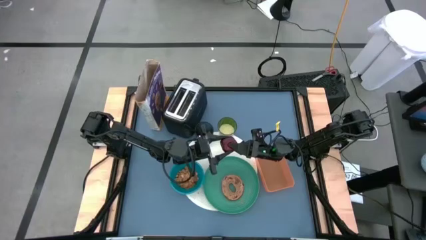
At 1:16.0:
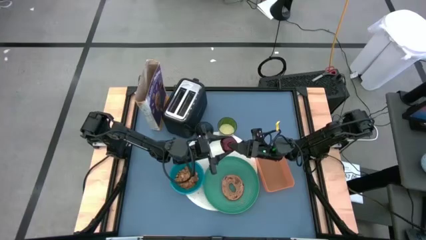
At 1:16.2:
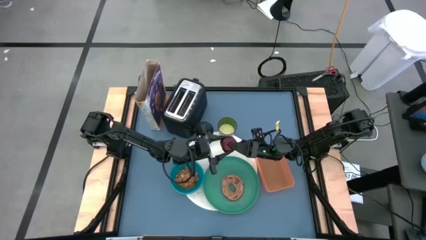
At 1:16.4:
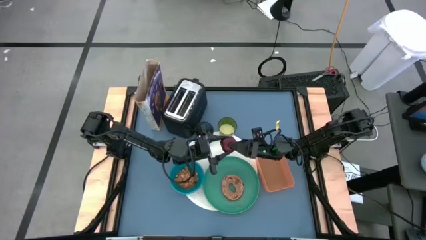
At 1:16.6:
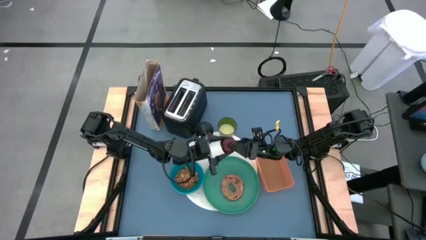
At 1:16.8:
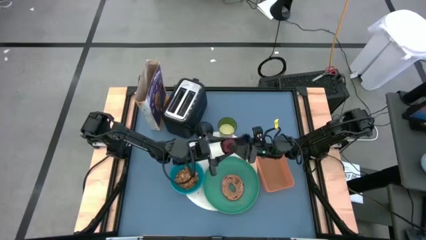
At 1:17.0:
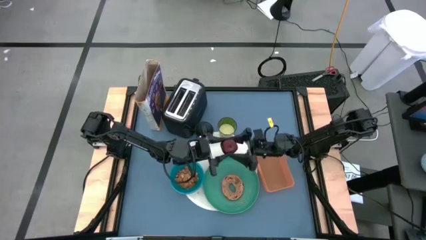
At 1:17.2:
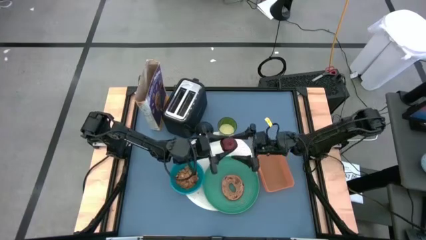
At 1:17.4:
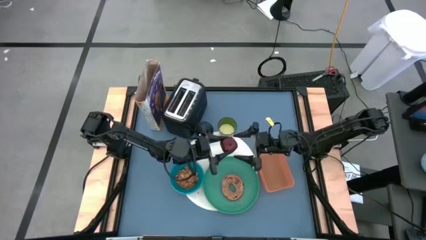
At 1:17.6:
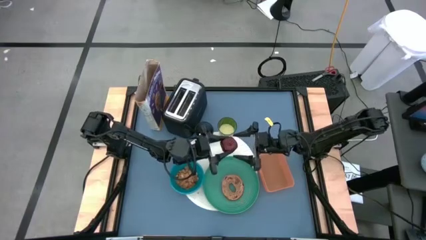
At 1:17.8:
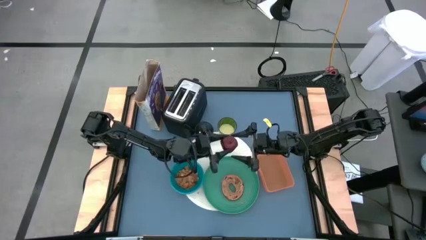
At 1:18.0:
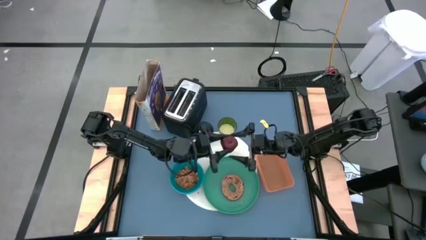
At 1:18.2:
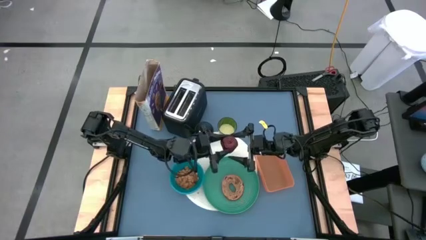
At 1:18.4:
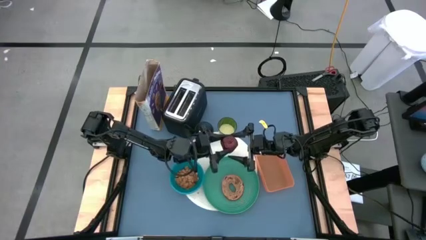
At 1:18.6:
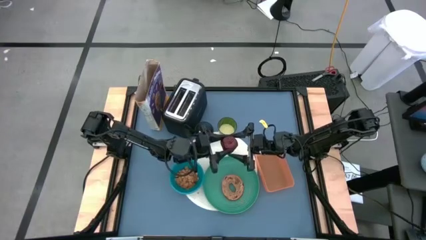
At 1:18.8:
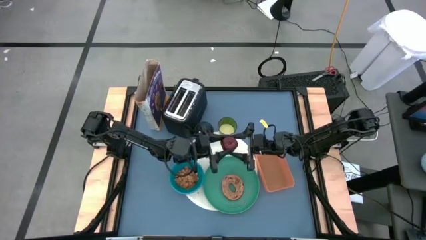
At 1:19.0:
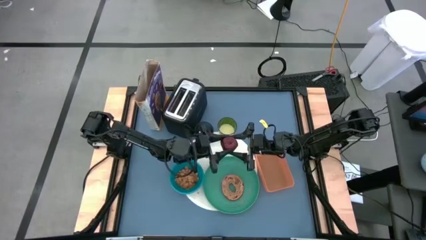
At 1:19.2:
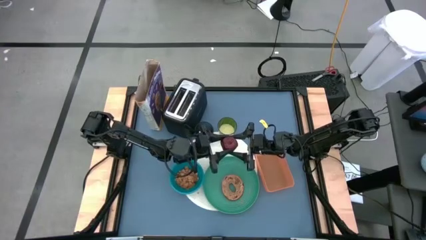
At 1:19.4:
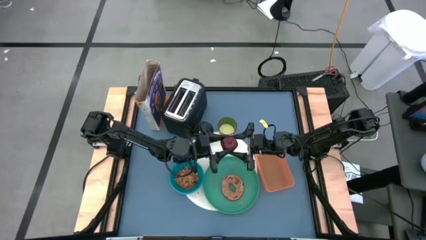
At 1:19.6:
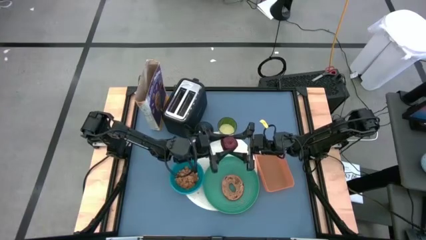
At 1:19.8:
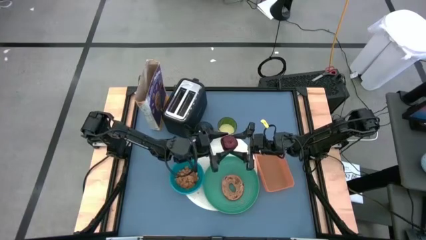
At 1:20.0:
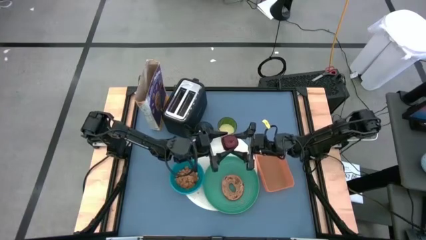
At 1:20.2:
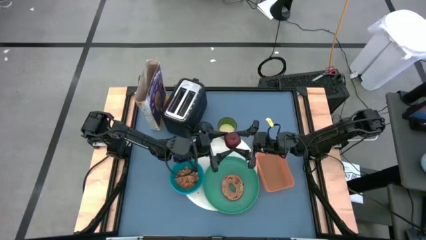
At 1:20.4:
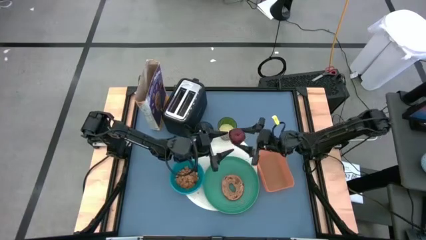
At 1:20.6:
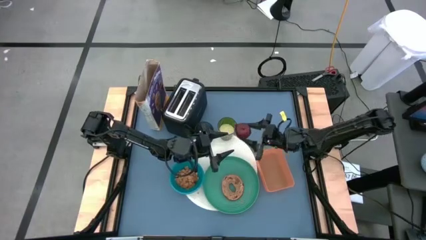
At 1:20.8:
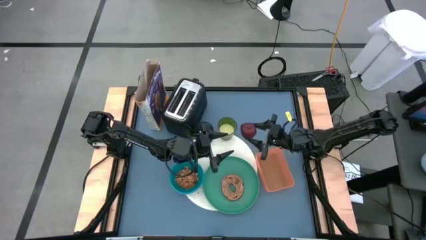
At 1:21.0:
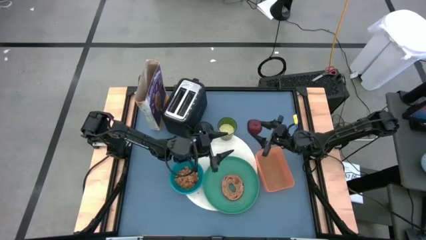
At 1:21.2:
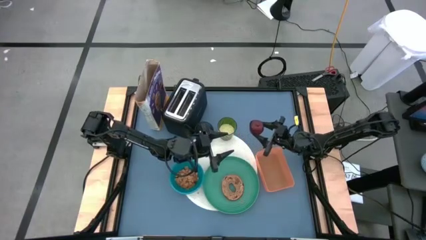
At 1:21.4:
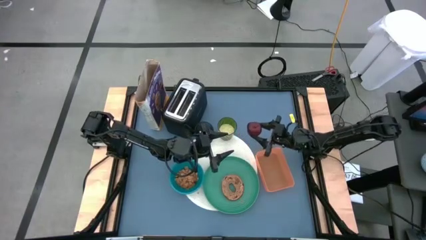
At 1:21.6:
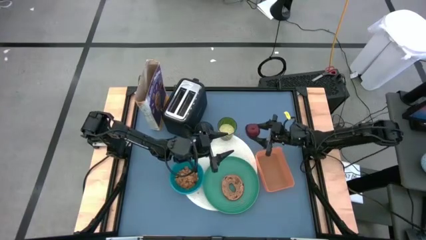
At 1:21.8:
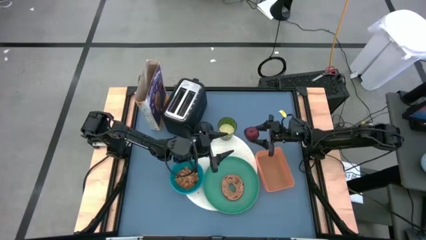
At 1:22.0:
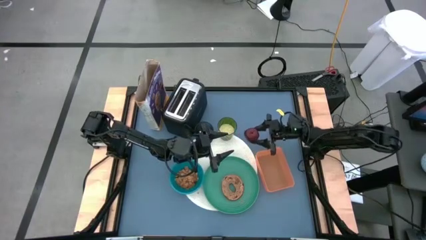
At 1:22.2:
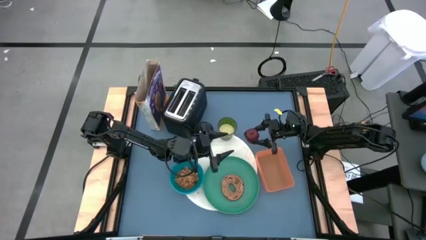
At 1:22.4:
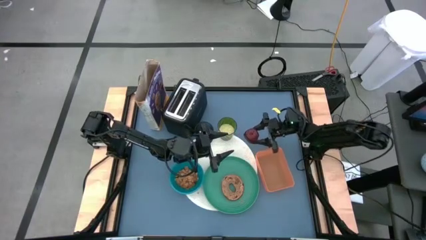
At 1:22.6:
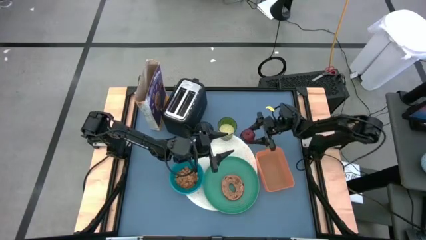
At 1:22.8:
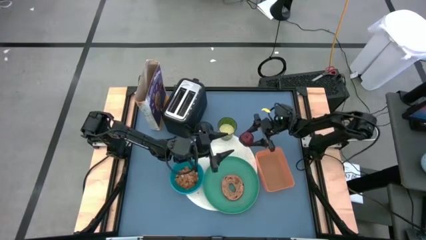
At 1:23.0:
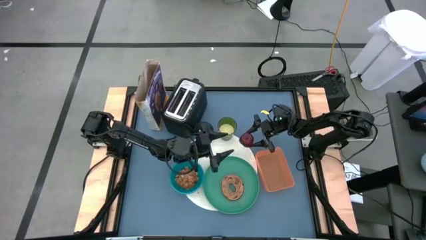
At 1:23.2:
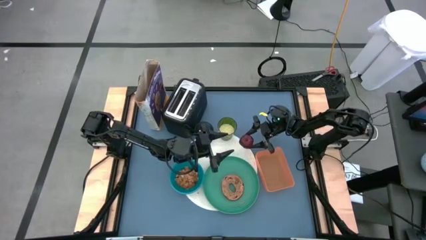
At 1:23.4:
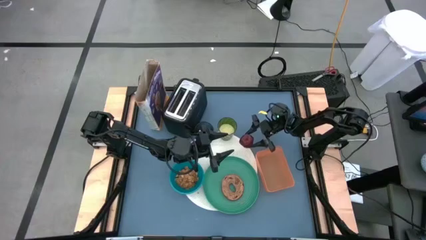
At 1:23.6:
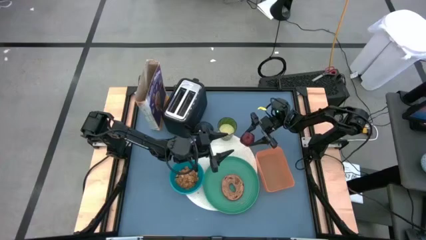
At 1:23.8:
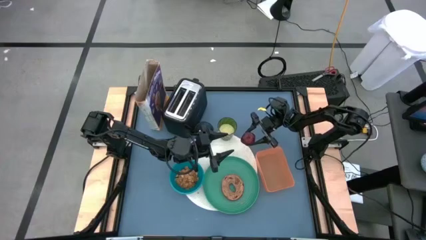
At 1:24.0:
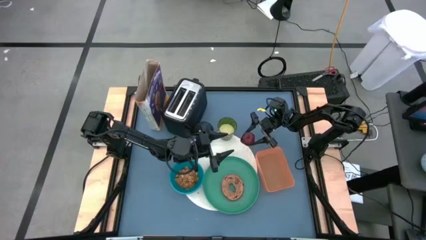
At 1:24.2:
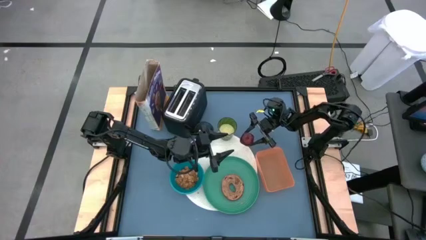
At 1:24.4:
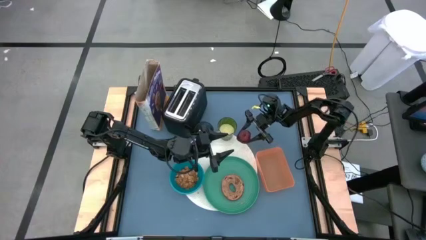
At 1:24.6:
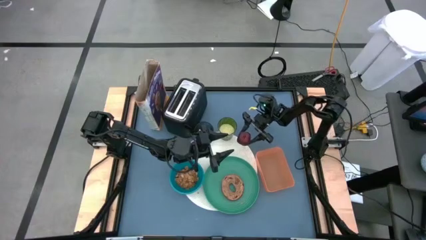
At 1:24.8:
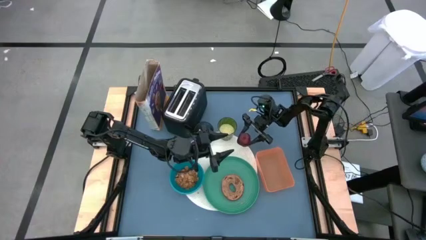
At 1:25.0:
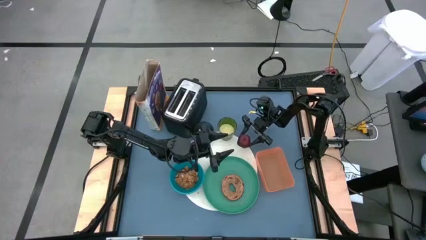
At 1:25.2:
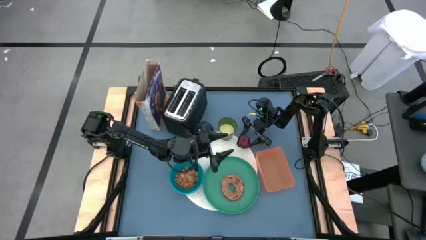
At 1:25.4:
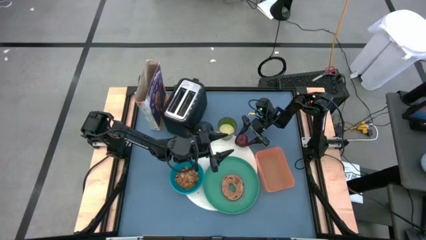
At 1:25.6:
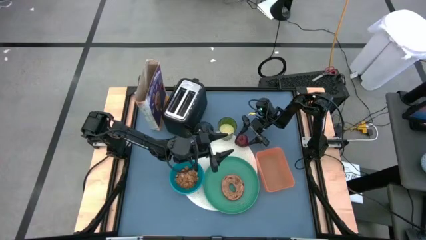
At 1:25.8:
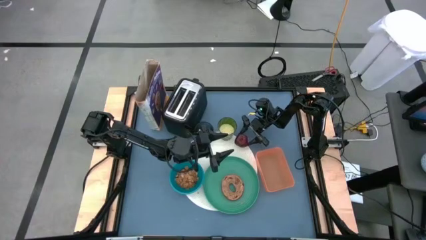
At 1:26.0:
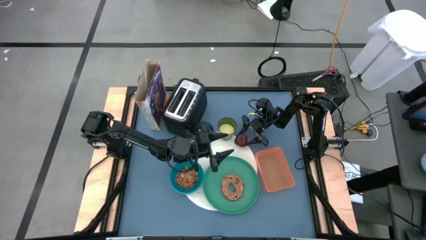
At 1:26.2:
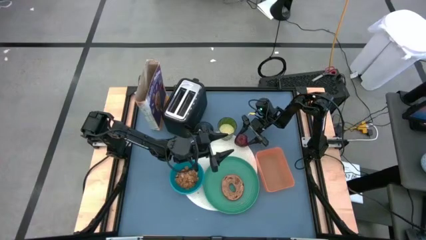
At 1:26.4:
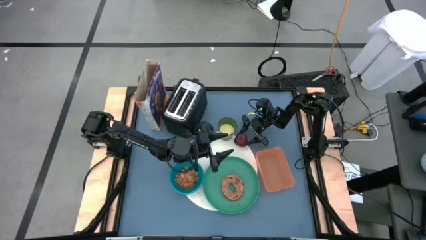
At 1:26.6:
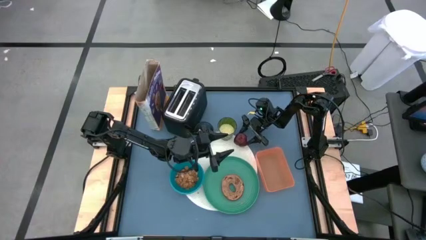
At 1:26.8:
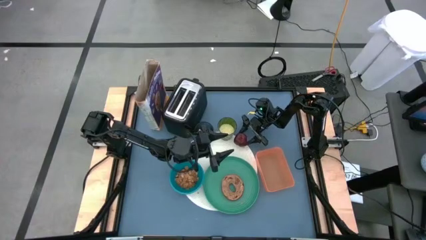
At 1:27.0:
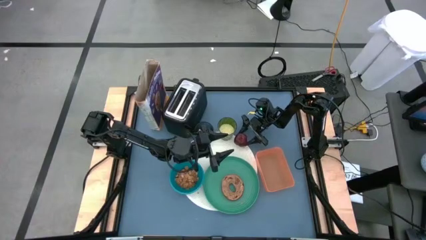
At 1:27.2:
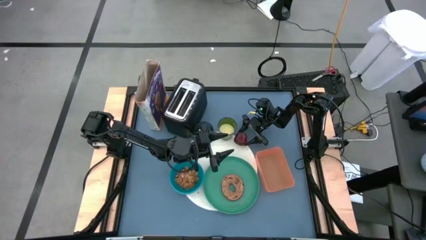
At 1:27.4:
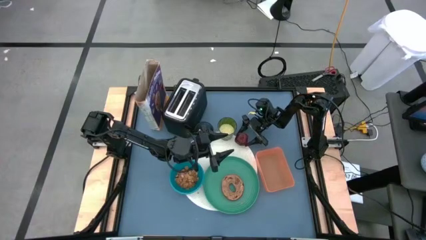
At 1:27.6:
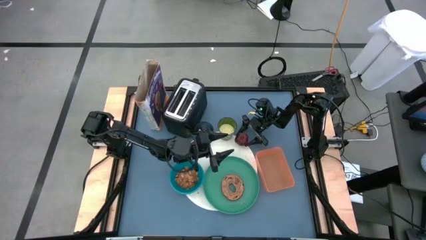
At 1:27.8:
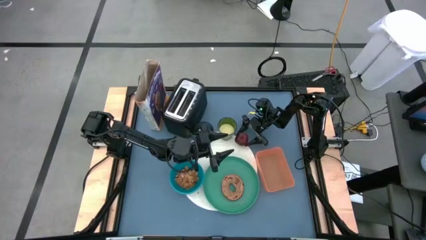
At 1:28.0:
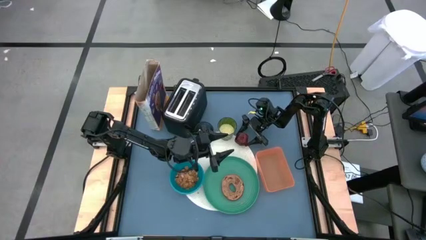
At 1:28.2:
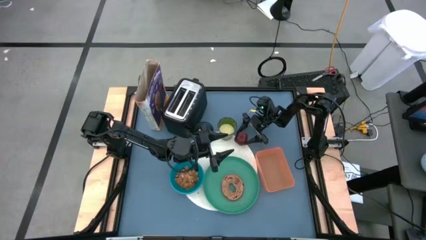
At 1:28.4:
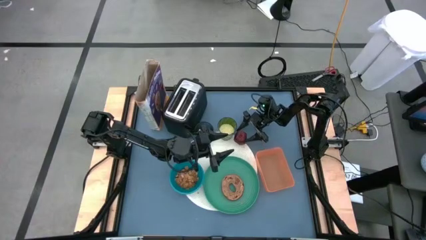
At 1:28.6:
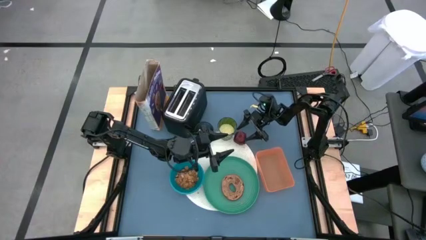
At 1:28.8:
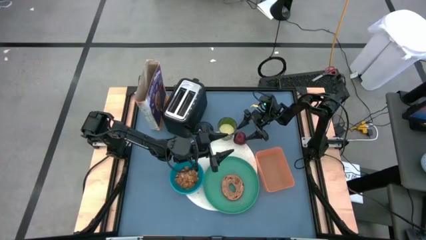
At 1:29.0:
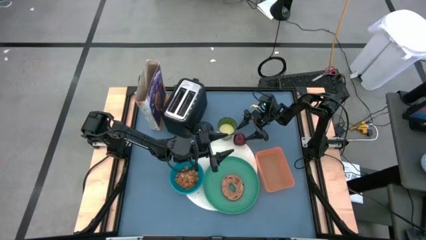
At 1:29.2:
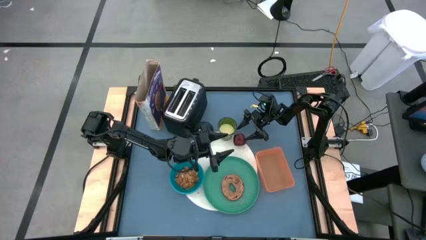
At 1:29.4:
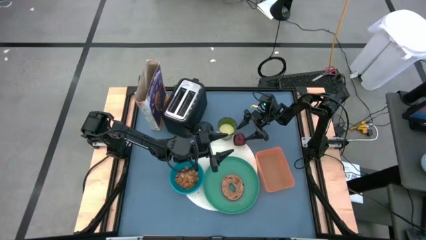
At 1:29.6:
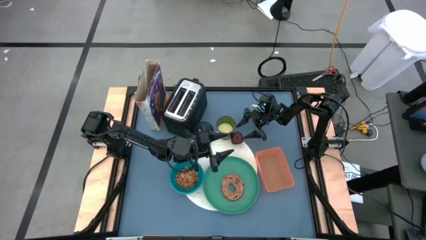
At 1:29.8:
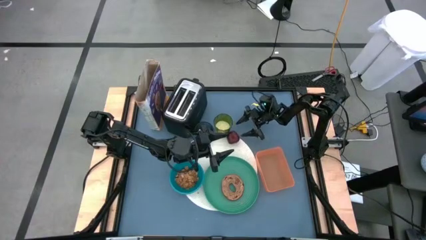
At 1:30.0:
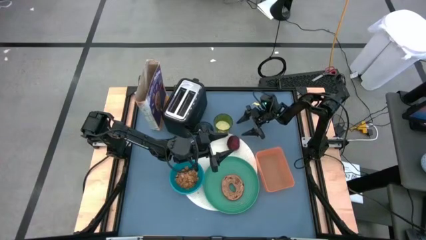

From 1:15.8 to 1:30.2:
Task: Arrange a breakfast setting
Put the red apple on the white mat
